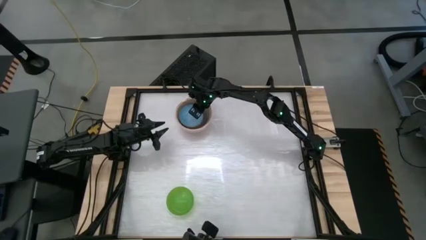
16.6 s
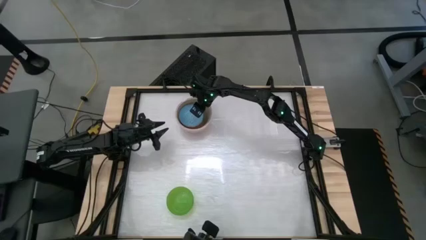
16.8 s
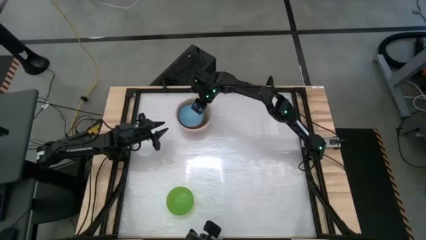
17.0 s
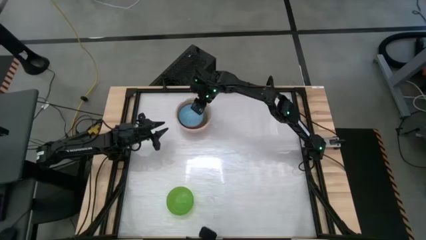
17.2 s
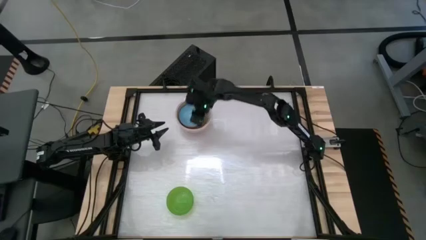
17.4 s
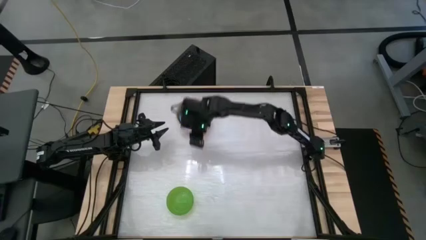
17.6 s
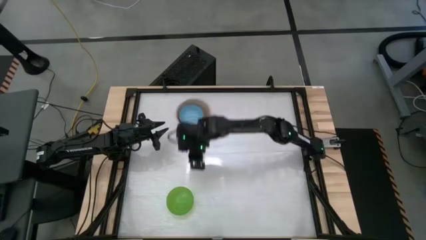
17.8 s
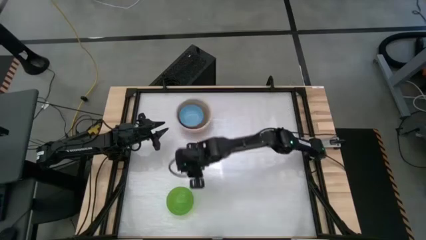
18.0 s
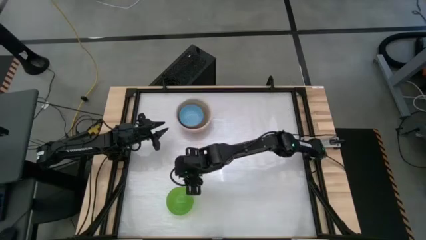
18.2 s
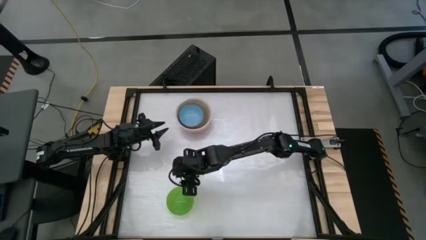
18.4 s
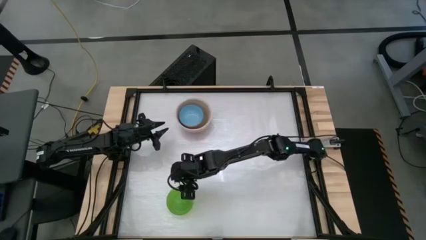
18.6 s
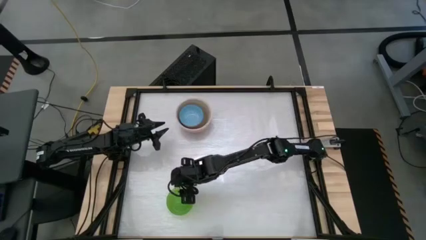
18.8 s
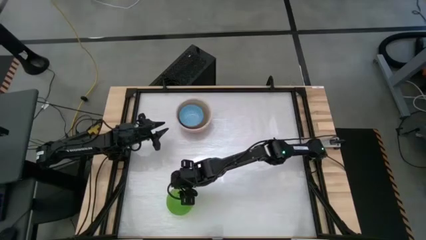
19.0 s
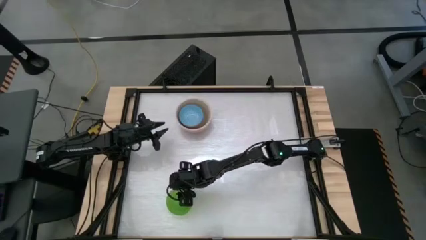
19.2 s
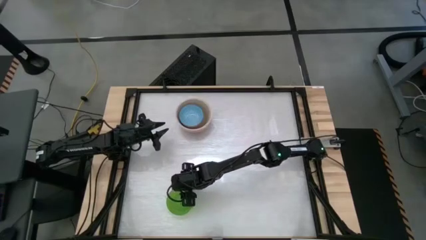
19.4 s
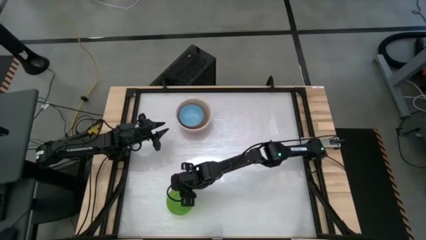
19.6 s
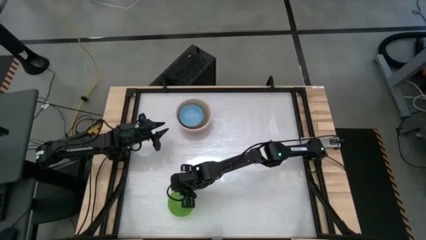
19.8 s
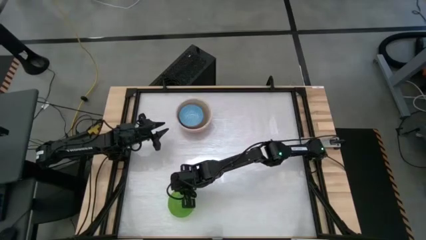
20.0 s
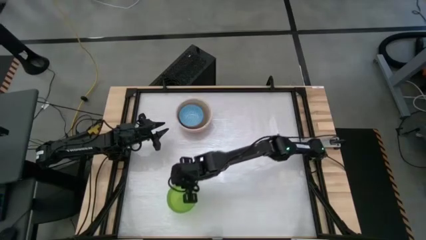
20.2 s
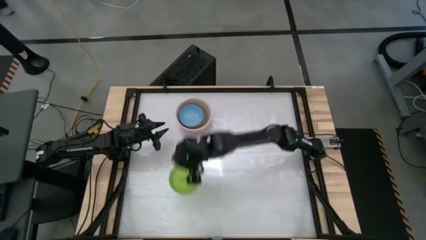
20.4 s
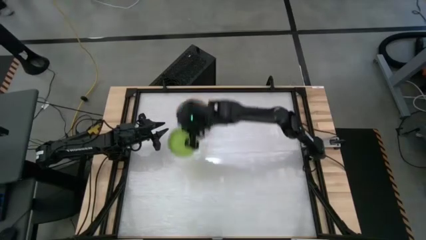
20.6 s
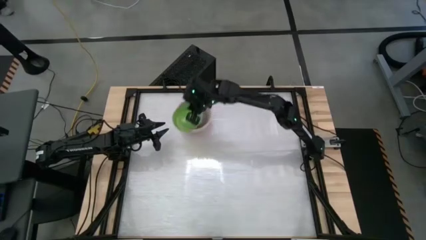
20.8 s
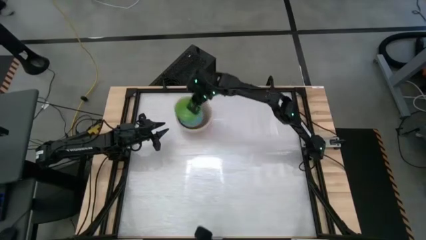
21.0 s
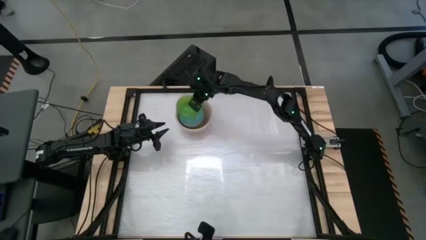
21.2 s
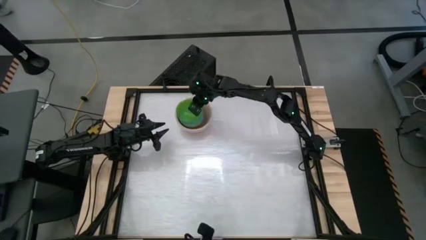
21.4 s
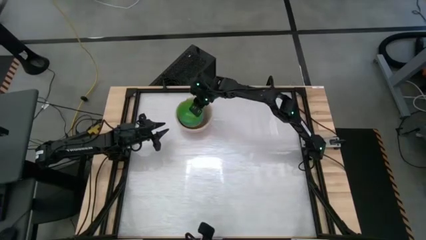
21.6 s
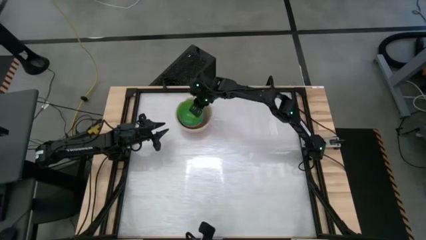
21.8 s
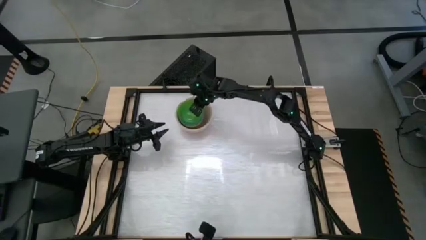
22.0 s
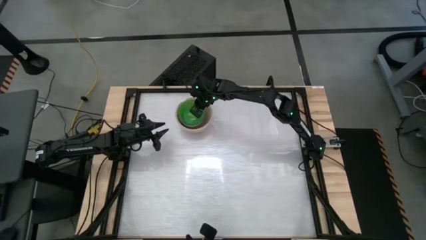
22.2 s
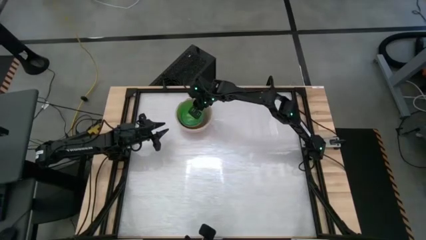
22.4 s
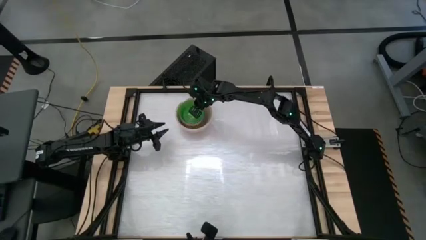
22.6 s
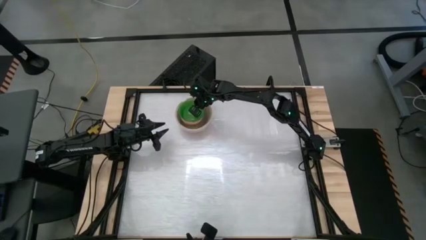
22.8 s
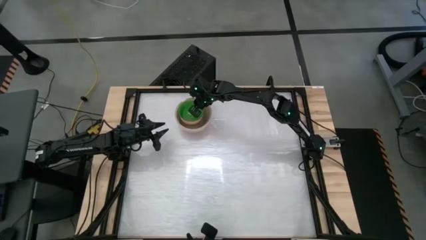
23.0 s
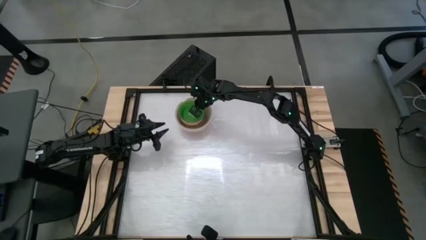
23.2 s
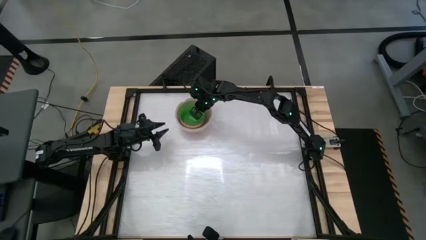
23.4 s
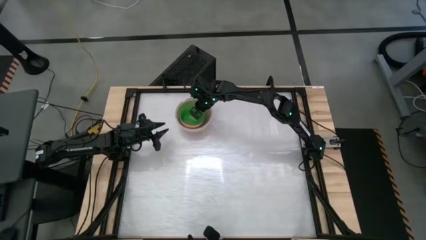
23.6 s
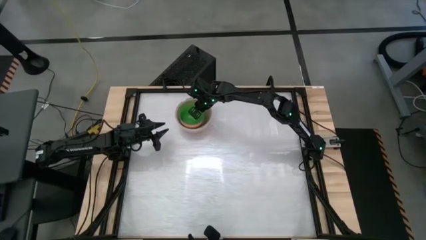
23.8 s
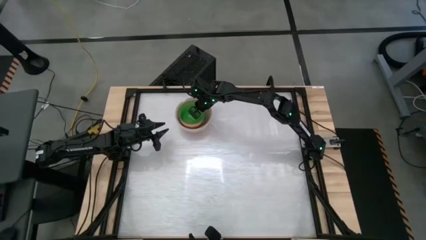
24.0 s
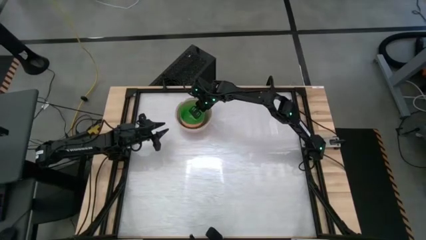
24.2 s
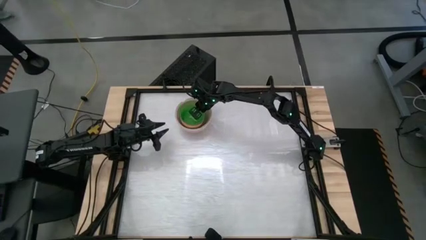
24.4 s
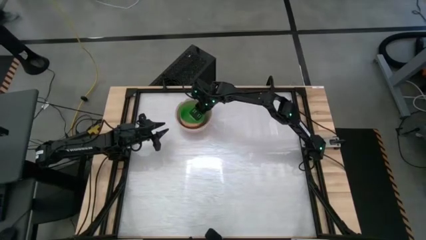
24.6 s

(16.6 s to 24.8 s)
Stack the green bowl on top of the orange patterned bowl

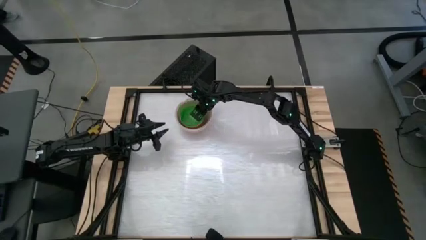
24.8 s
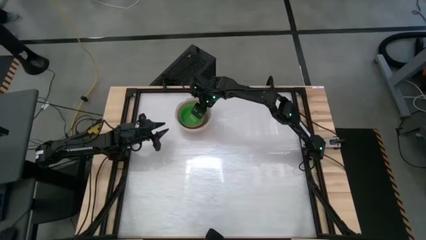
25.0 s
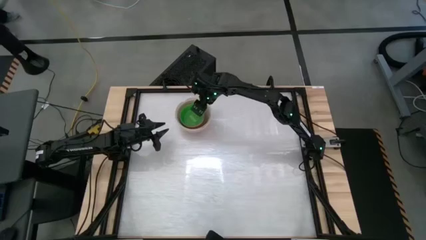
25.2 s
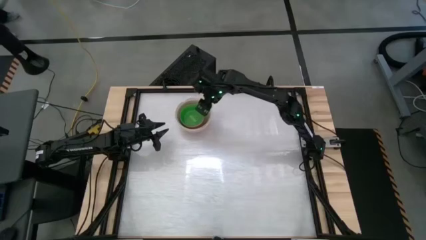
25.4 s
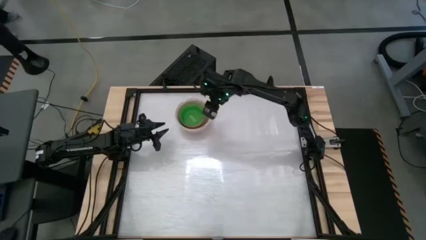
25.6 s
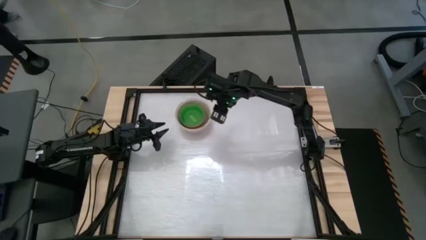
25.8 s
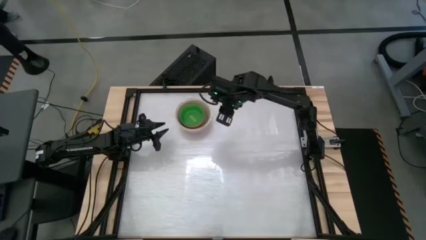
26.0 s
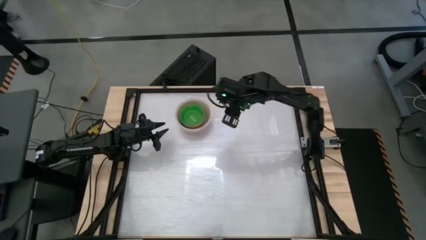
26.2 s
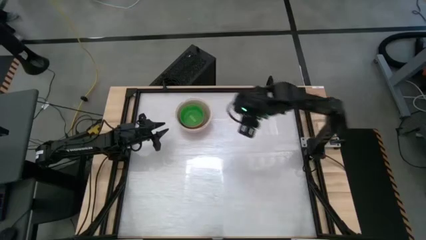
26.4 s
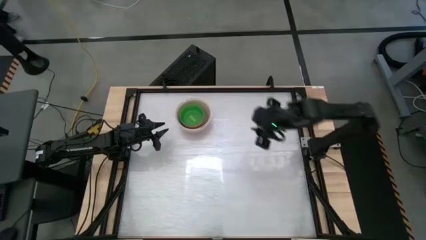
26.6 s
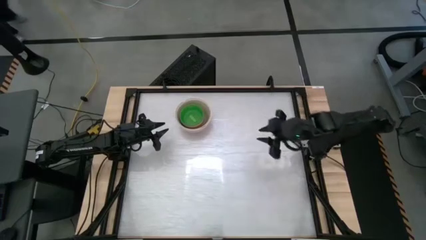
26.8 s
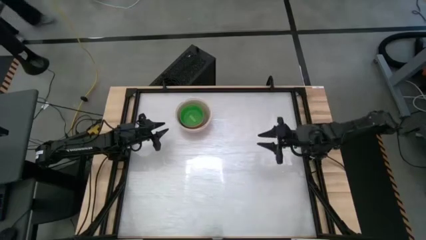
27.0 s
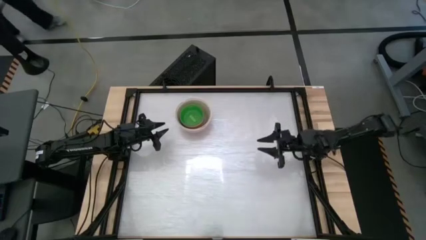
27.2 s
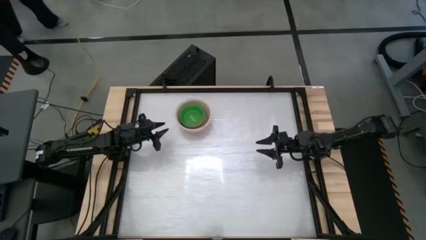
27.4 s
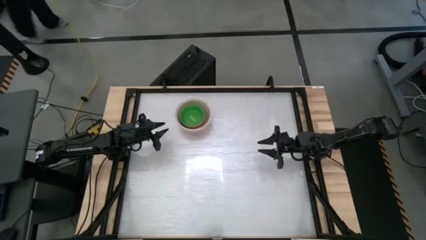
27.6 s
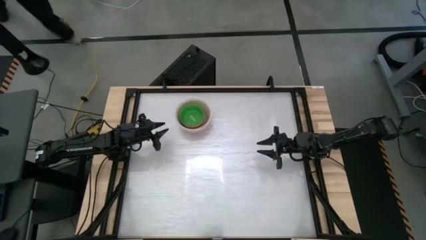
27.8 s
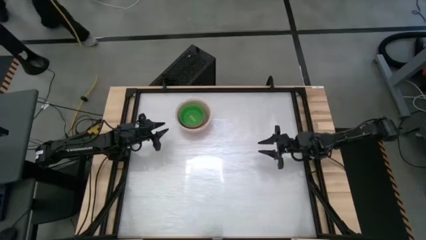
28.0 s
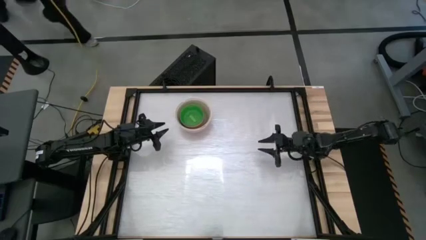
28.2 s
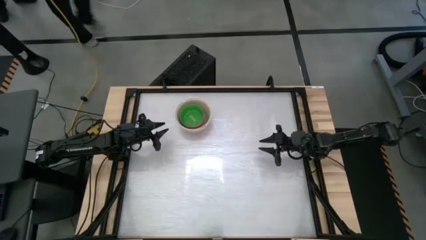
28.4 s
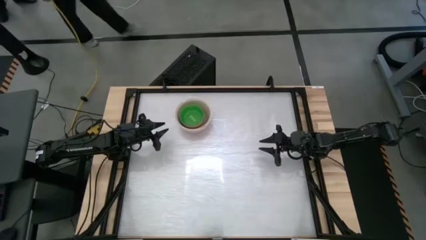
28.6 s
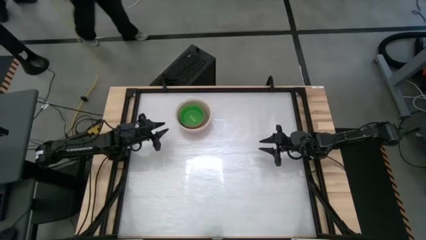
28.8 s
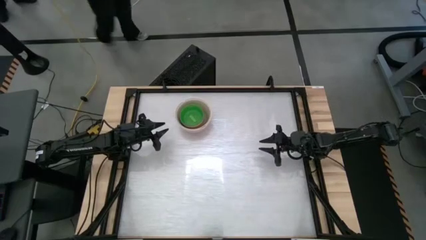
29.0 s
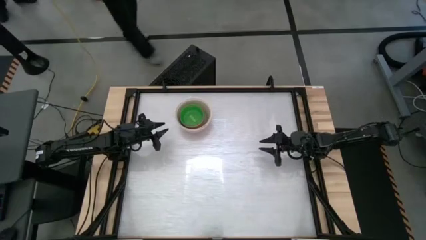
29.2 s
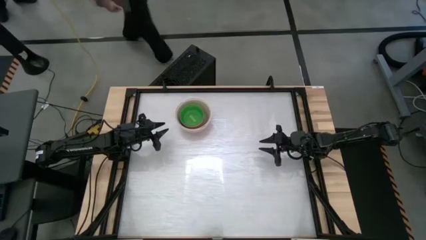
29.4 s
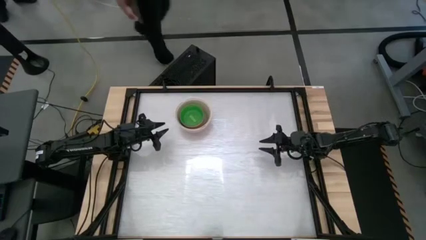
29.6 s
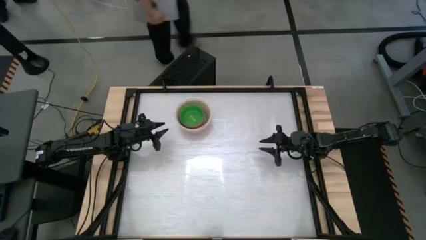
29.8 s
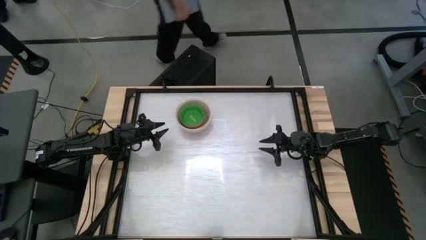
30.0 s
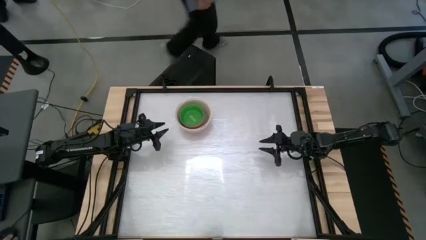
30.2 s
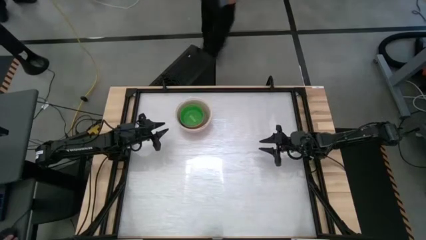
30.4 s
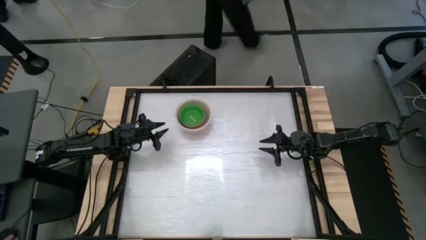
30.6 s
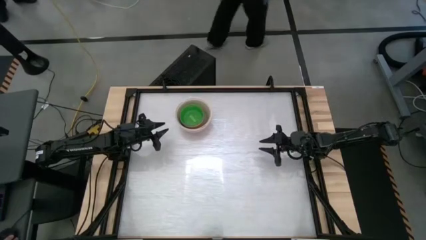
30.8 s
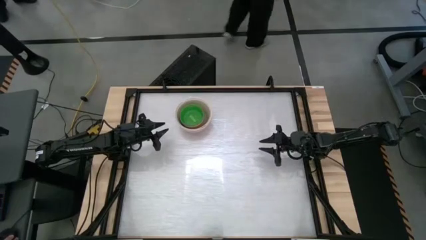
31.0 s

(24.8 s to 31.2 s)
Return to Home Position
